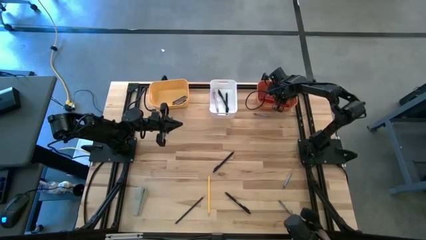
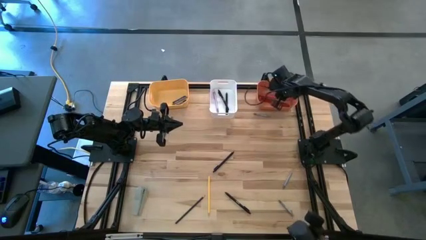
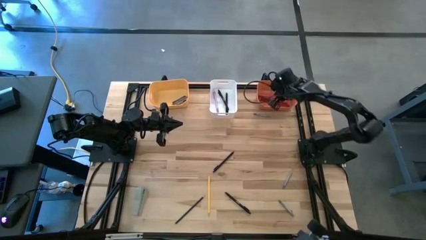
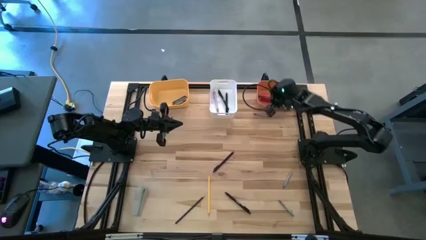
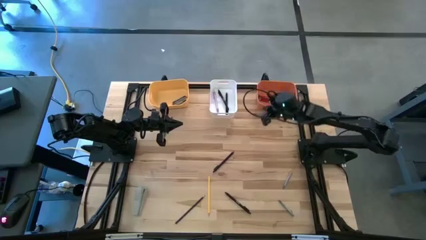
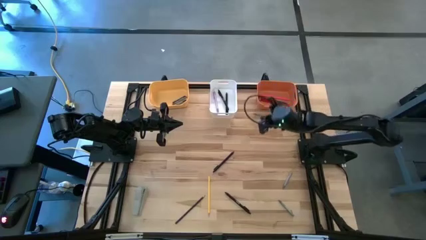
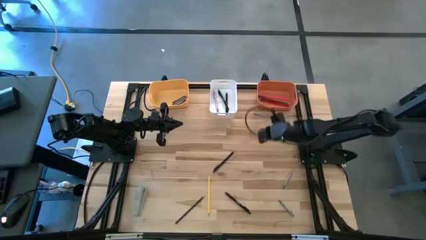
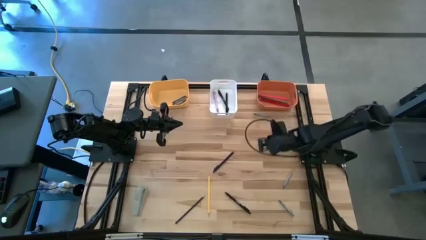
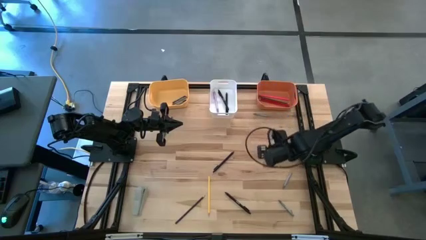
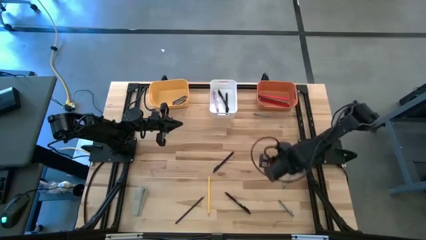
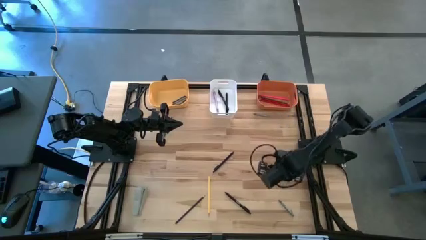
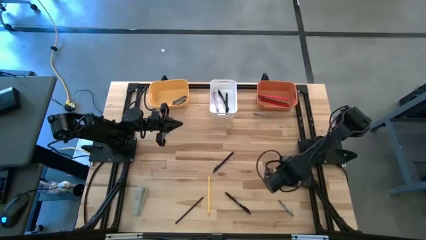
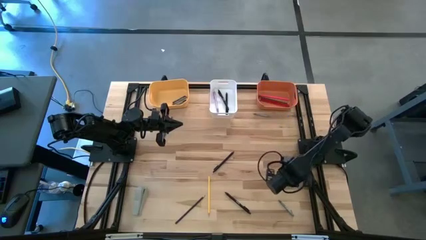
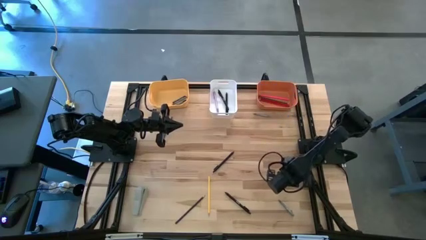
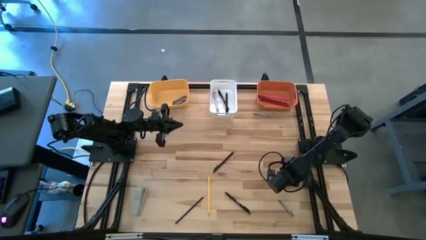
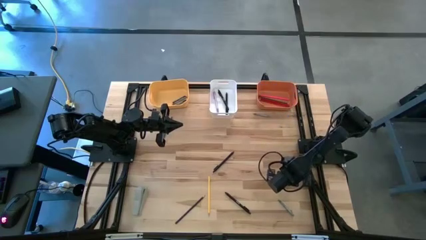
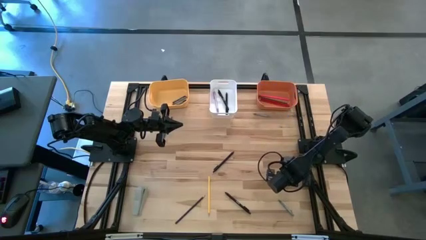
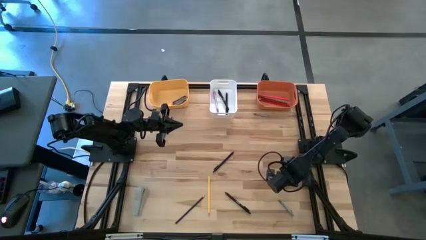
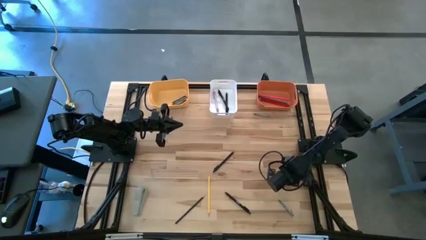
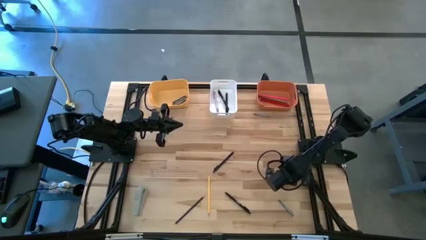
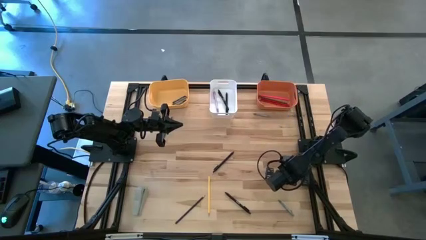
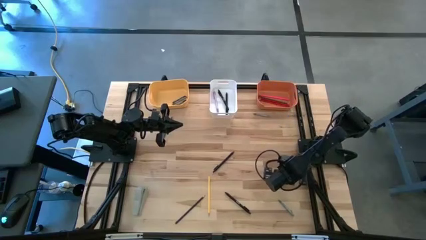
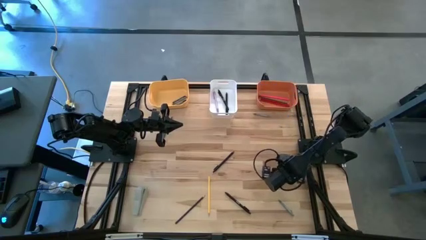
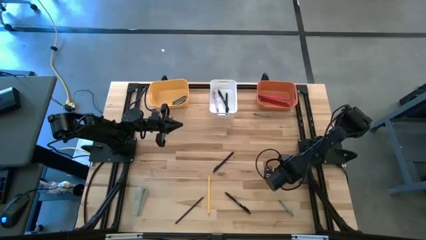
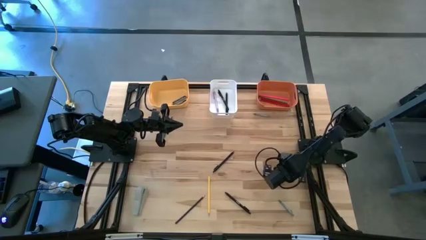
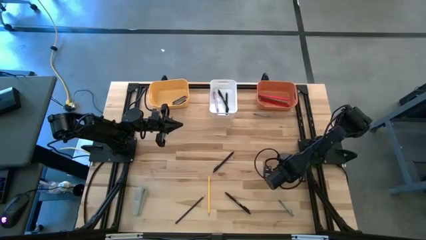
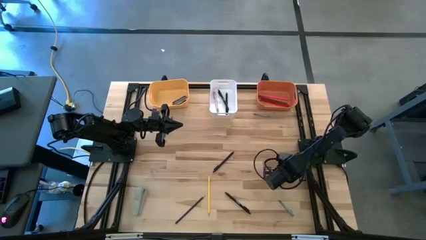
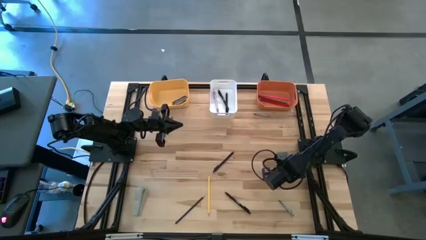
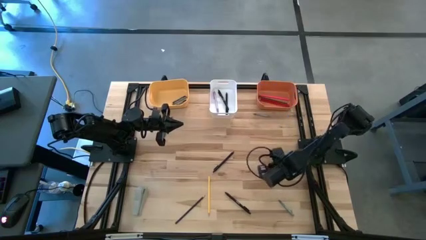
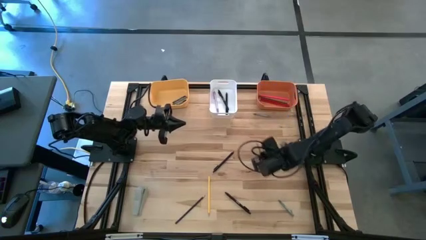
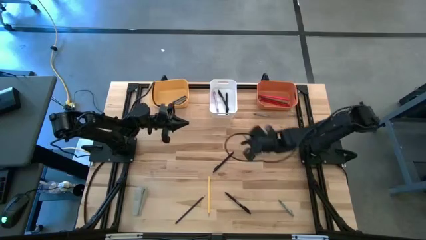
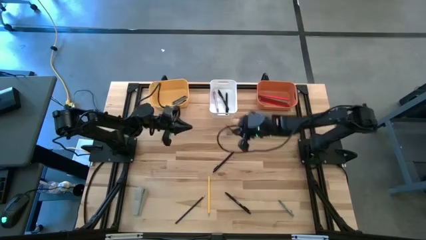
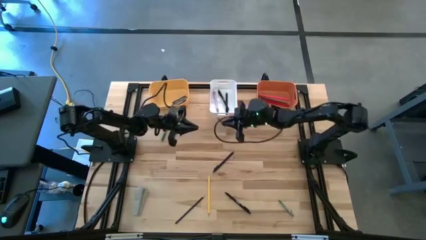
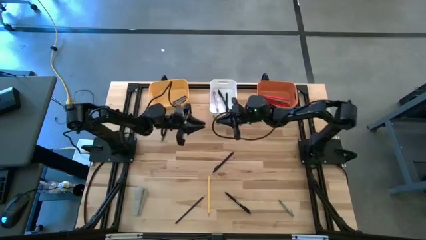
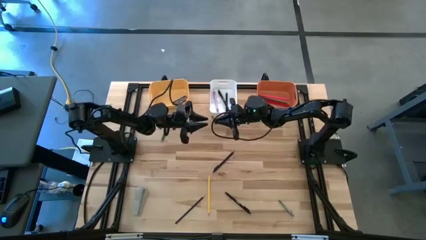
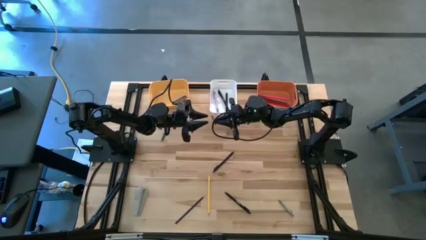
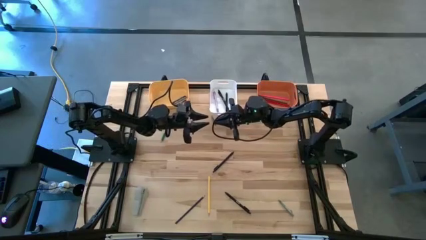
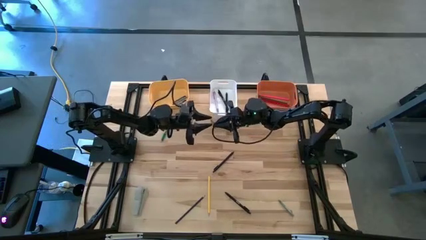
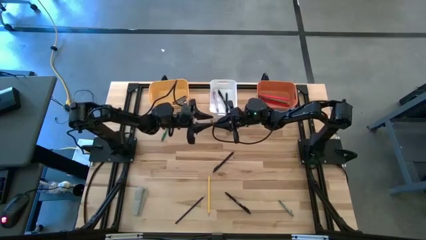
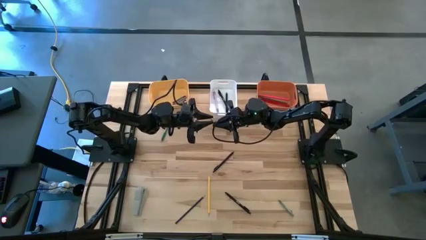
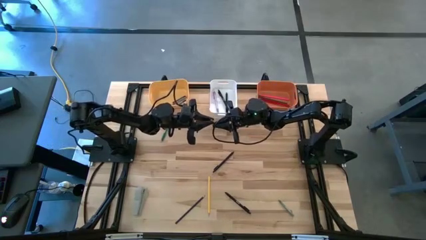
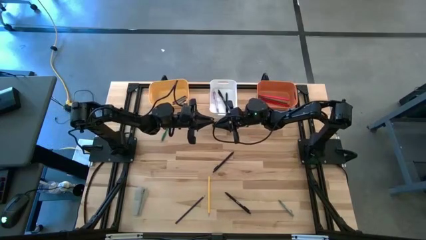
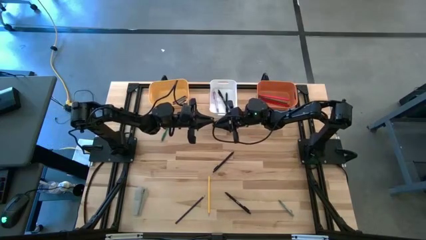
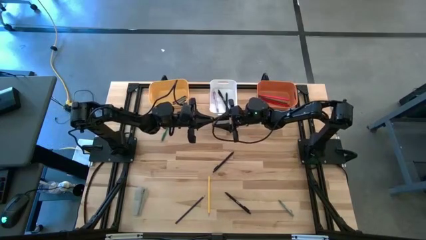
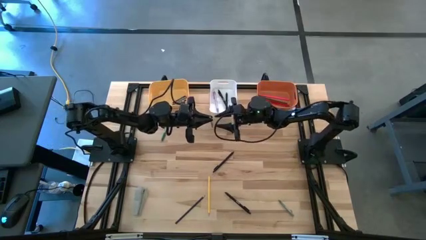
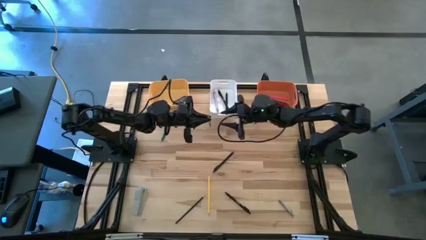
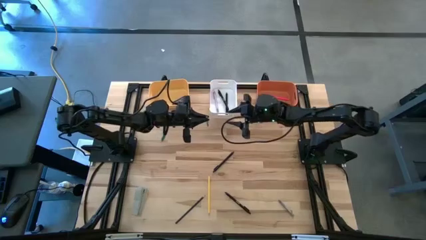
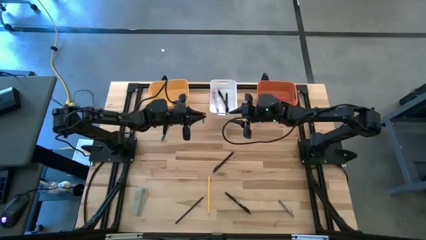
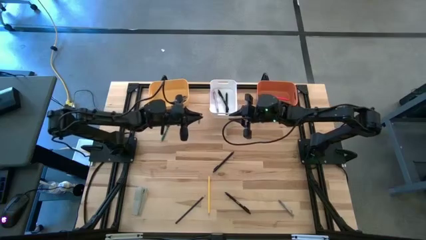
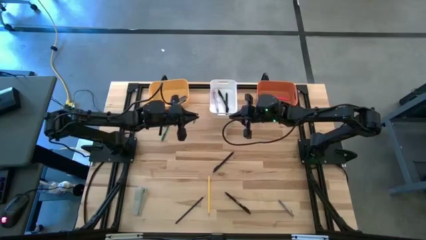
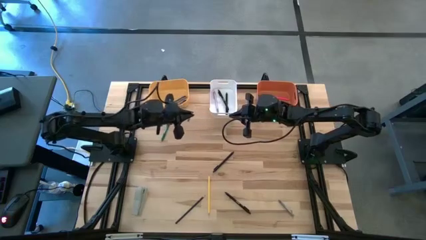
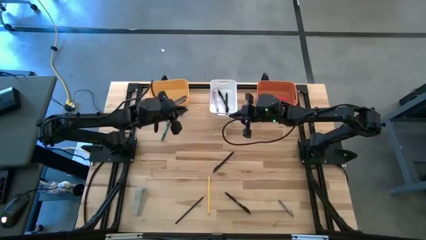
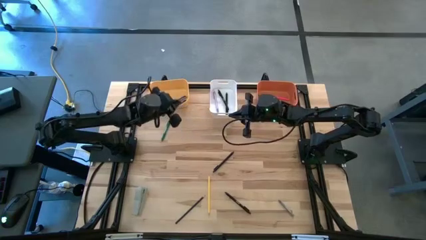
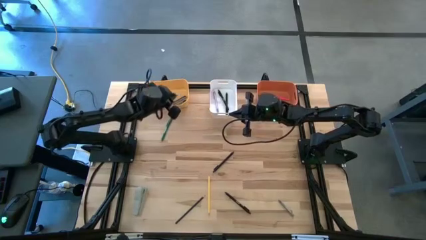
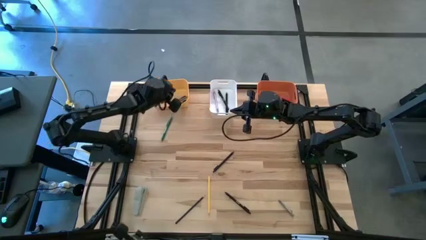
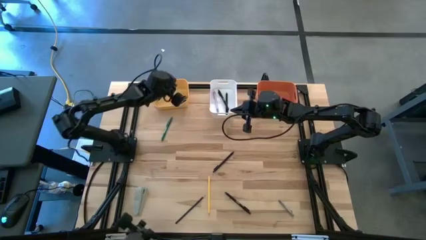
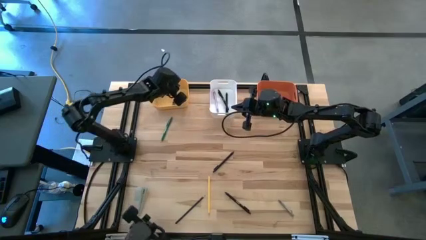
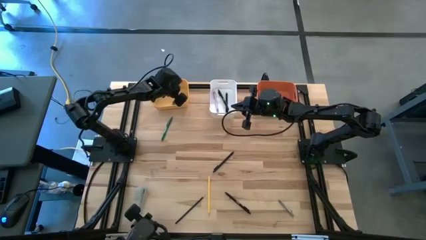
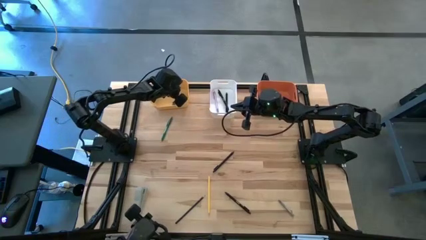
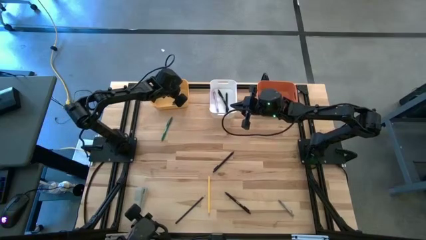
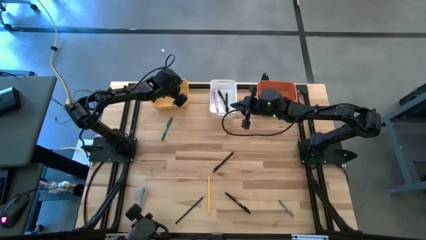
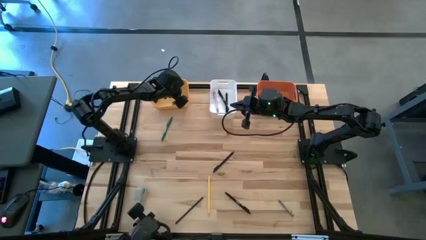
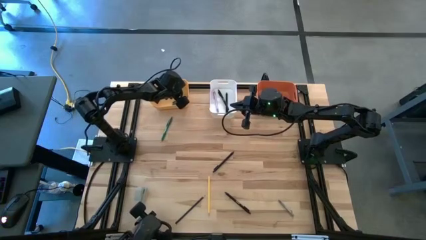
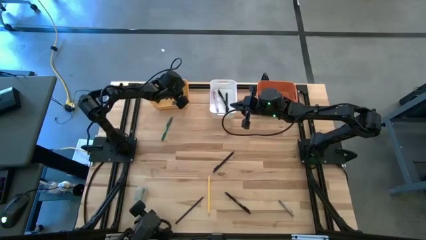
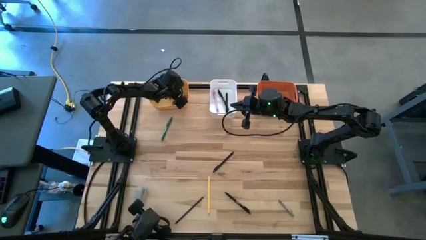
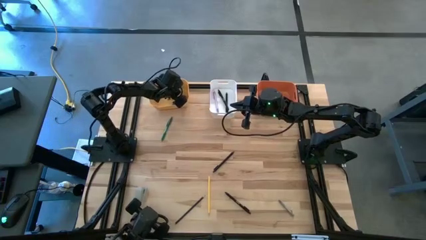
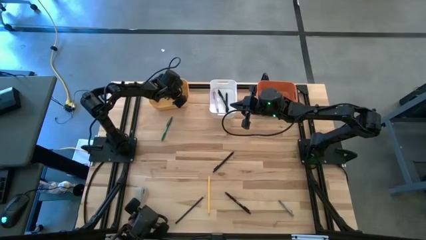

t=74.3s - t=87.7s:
Task: Sort crayons/erasers/pens/pencils in bins
Put the gray crayon into the yellow bin
